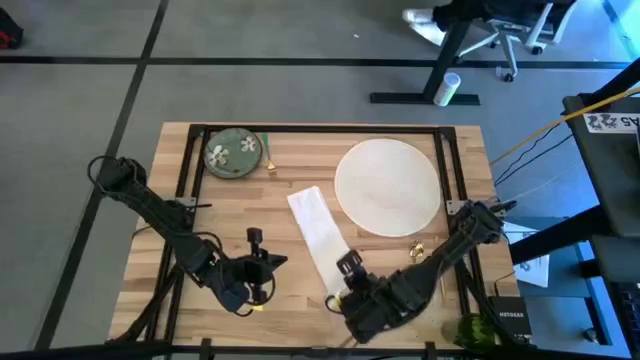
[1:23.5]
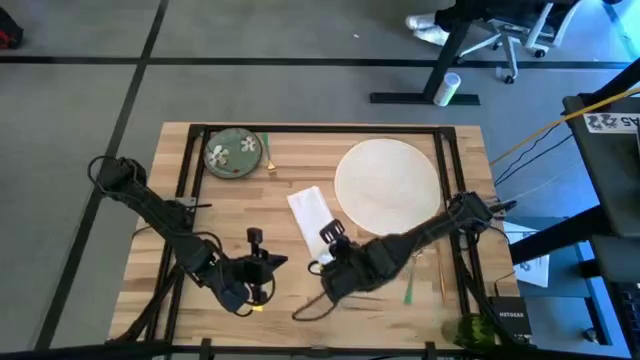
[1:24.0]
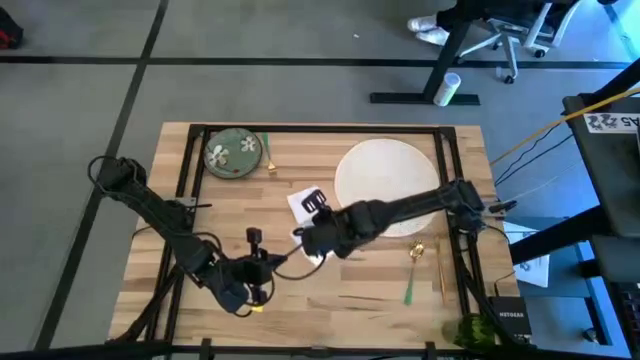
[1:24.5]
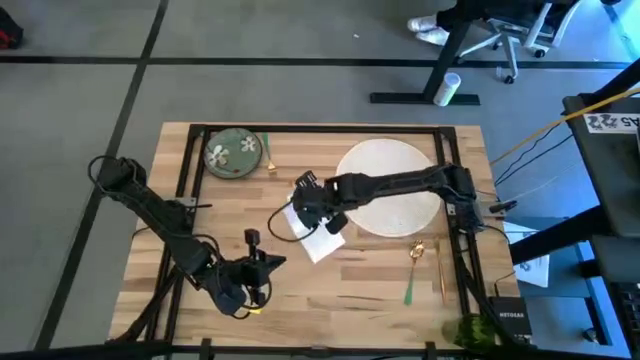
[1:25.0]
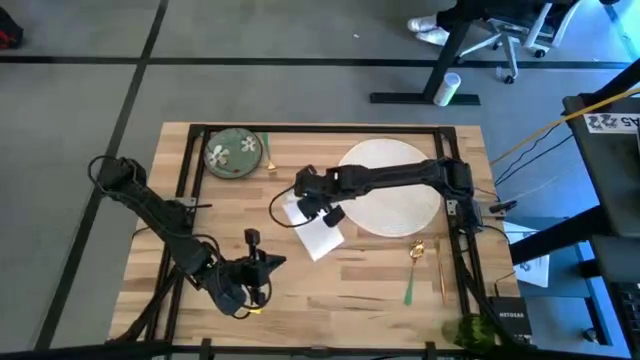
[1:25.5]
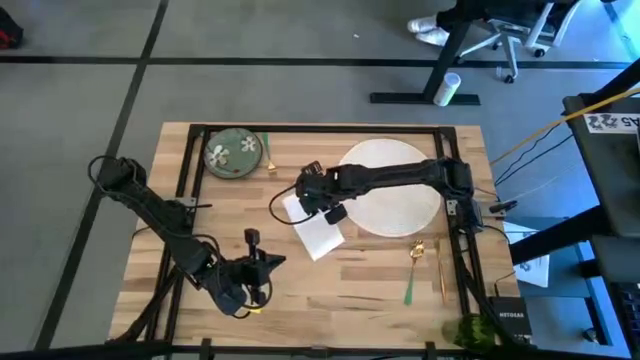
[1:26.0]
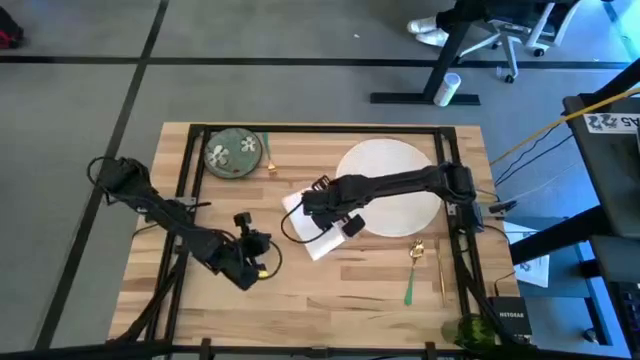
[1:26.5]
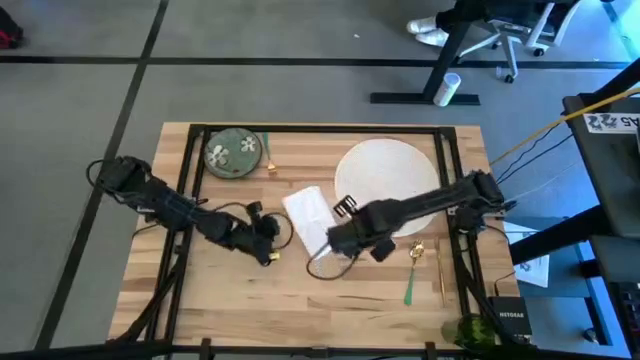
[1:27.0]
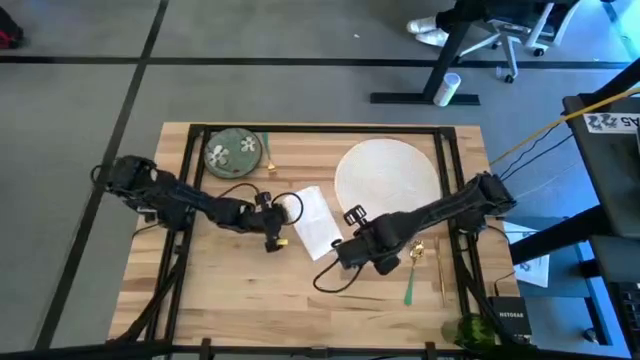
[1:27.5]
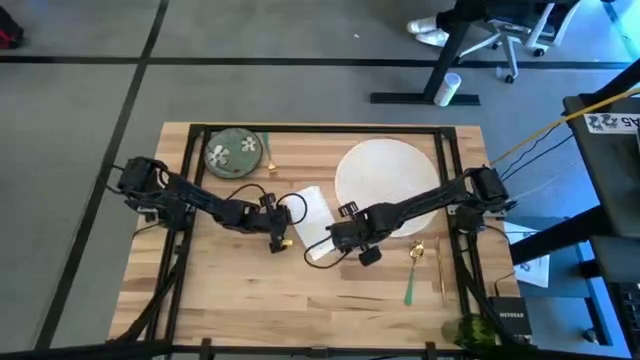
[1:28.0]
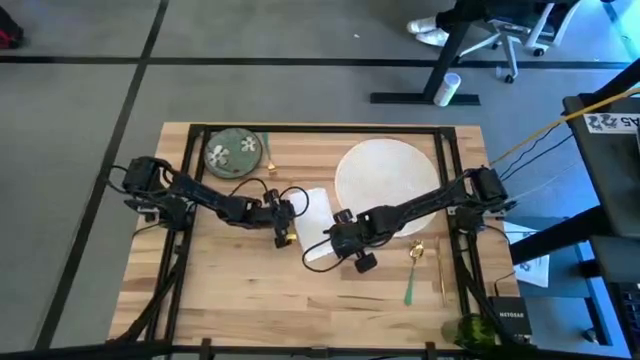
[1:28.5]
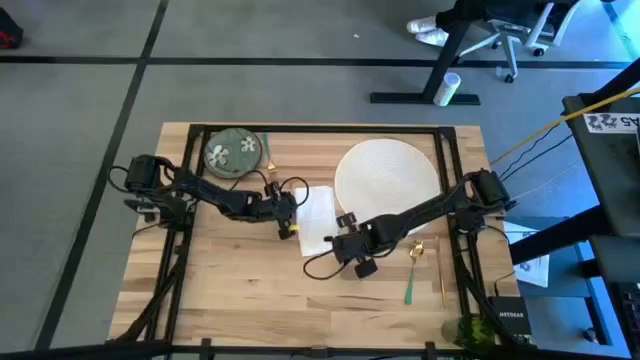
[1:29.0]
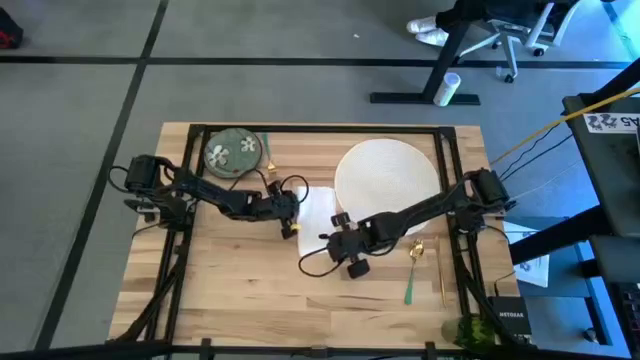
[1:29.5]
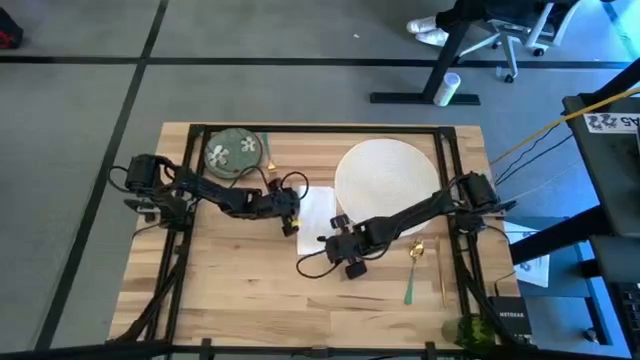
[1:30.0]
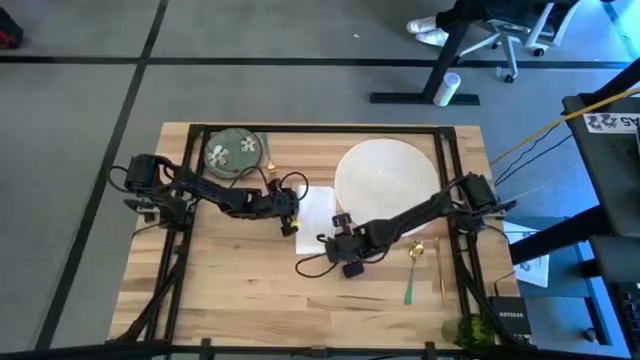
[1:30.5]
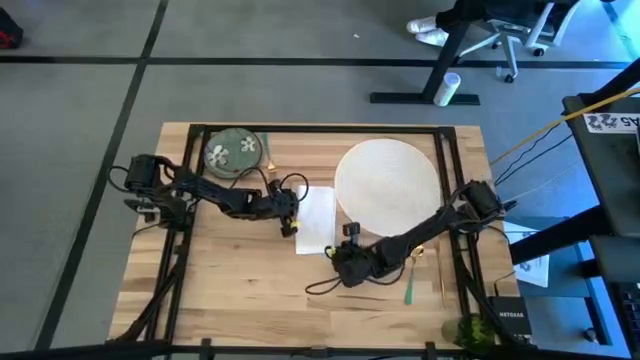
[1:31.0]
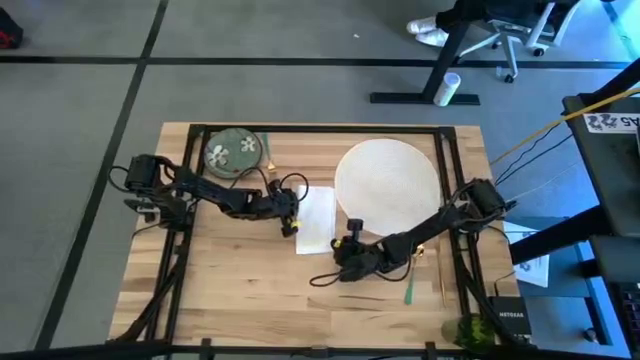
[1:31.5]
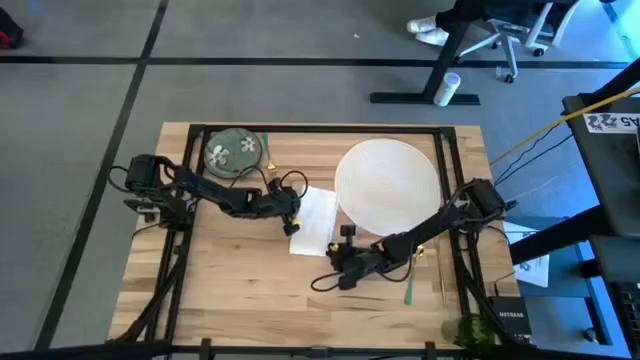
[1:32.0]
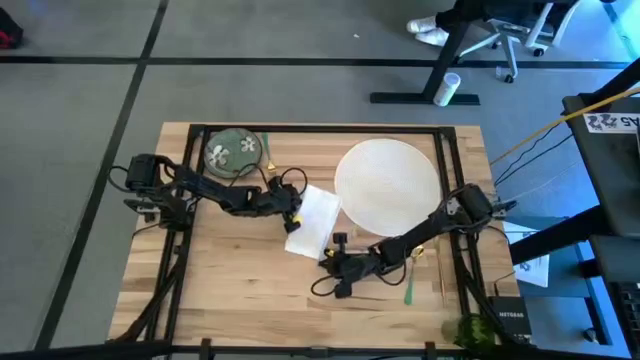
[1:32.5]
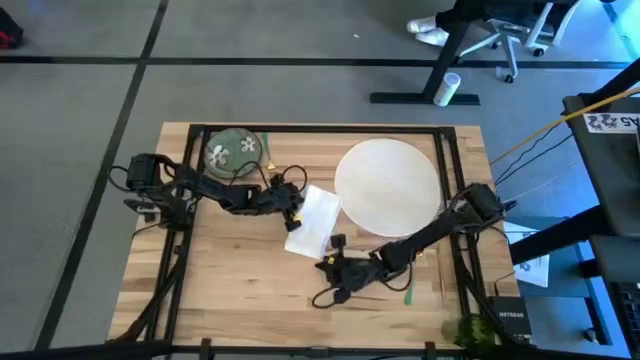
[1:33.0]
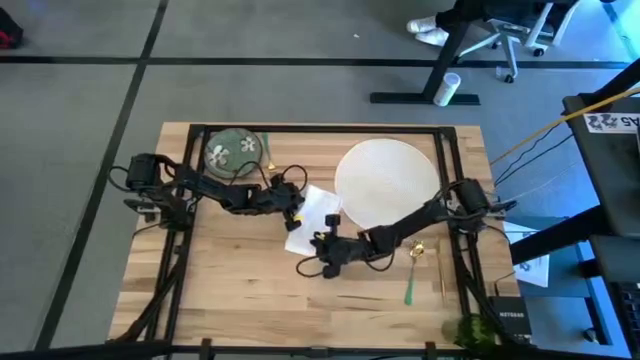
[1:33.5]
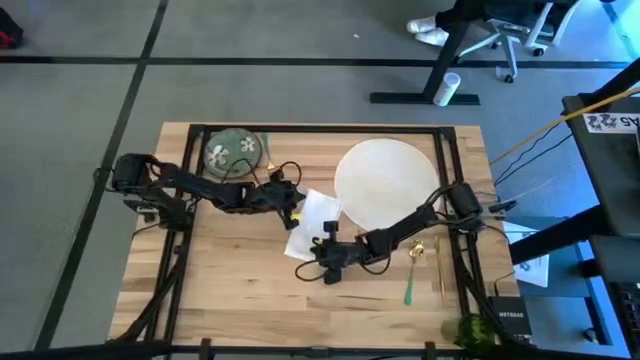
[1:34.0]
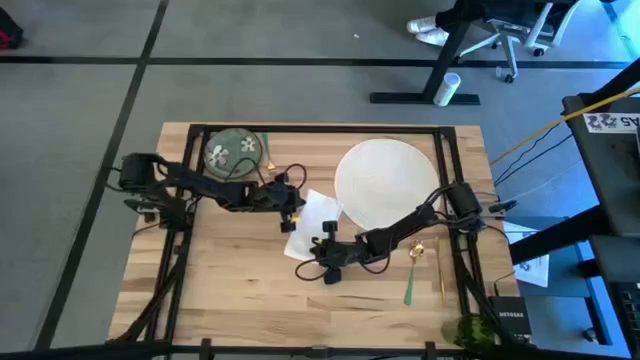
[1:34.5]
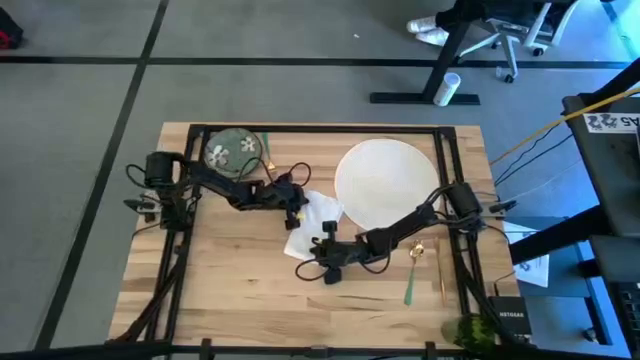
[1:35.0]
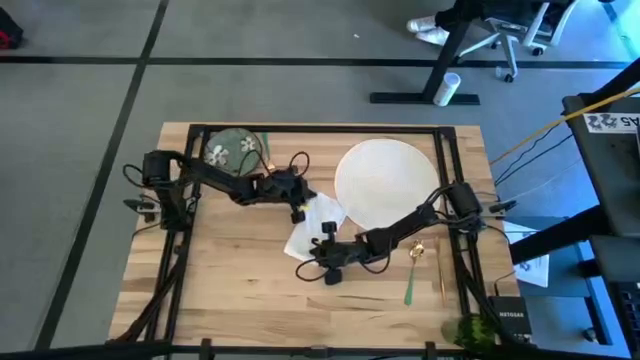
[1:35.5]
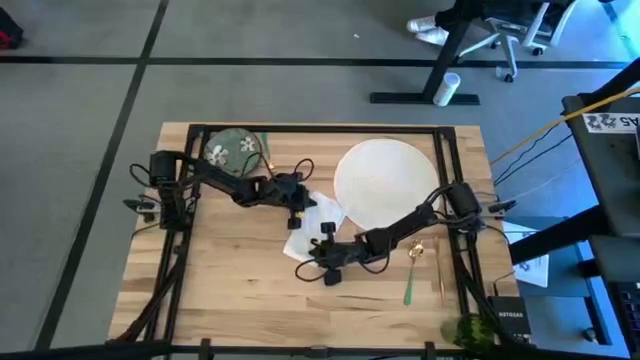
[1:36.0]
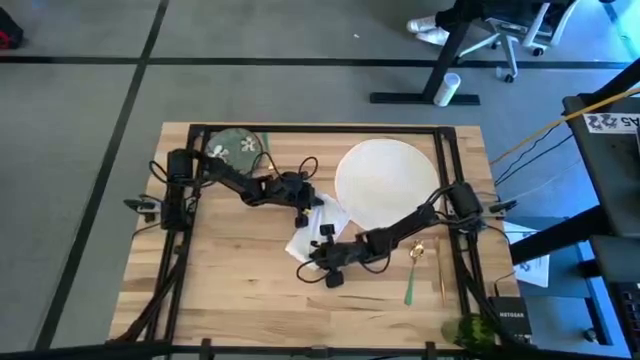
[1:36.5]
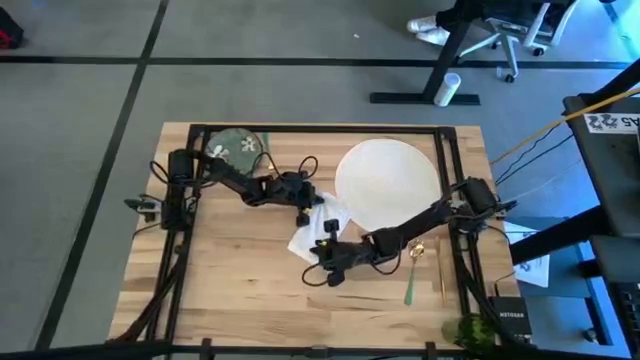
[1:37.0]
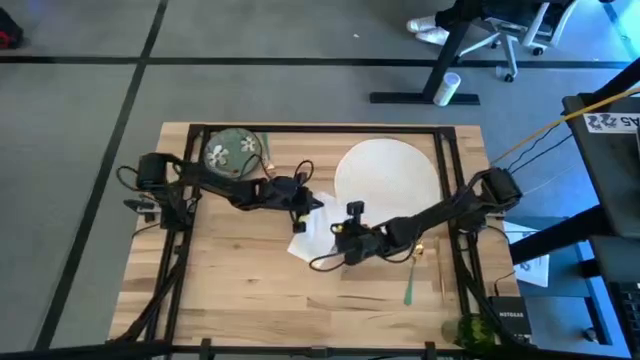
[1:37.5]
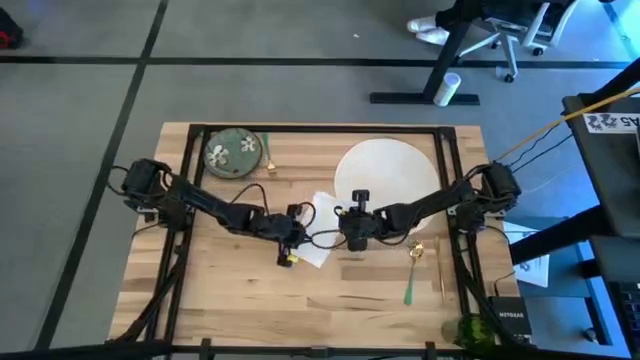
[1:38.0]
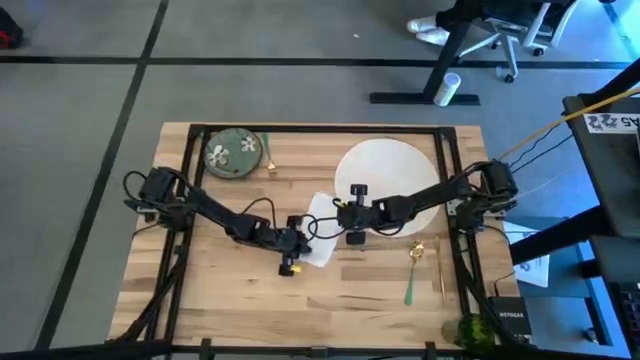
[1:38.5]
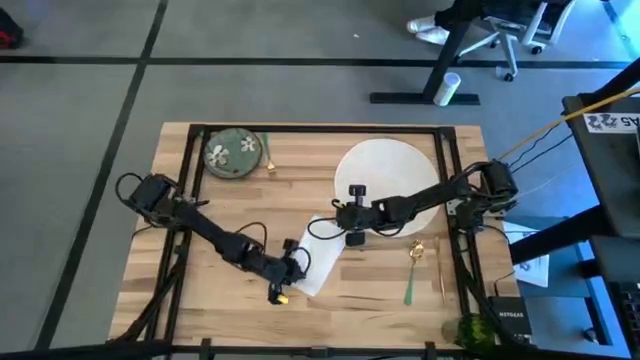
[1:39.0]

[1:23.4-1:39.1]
Task: Set table place
Fold the white table napkin

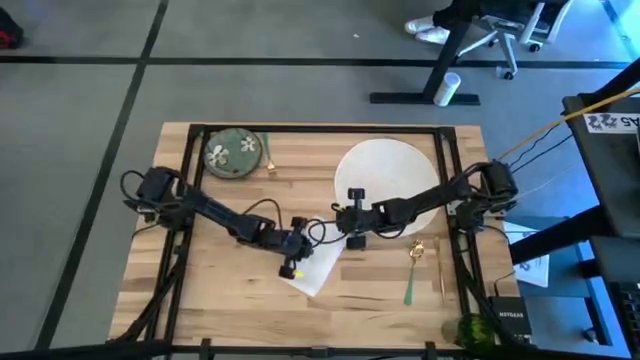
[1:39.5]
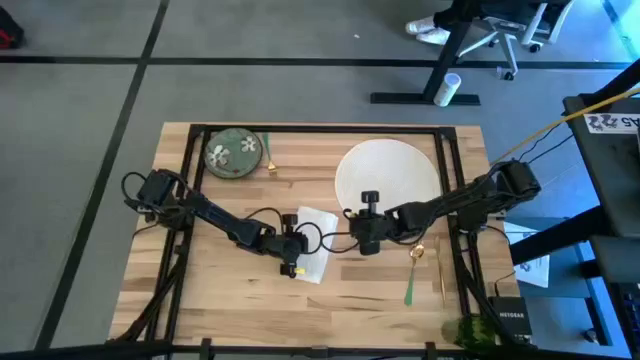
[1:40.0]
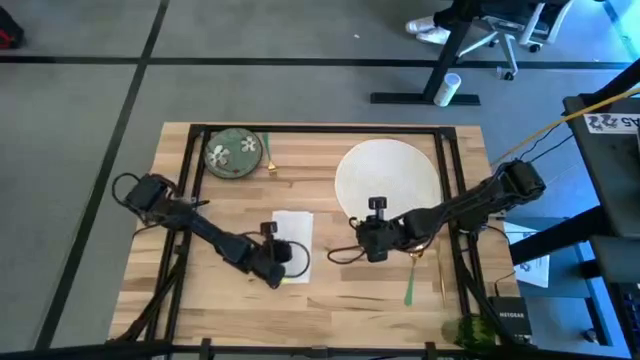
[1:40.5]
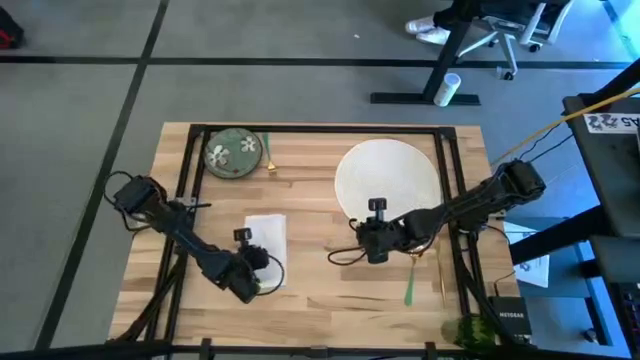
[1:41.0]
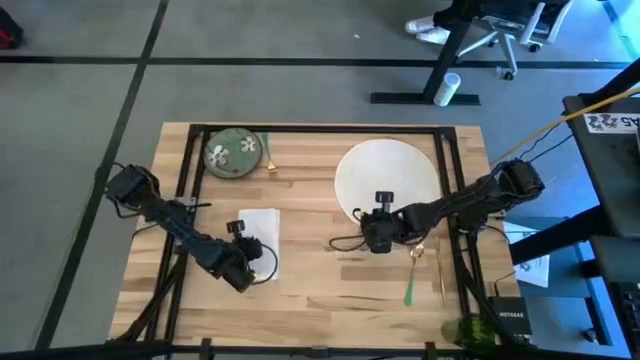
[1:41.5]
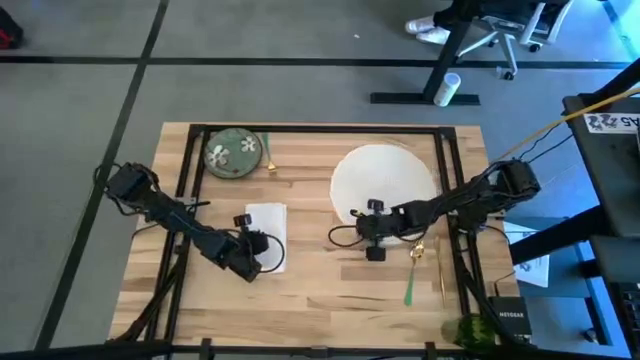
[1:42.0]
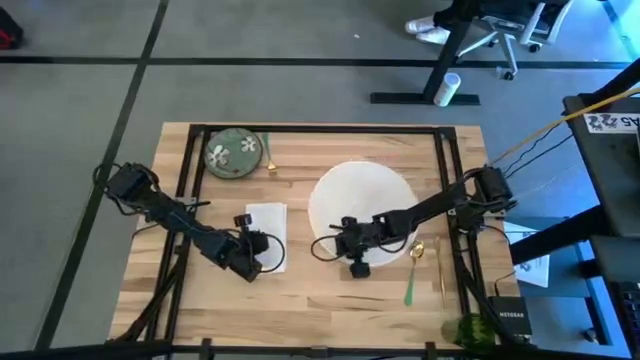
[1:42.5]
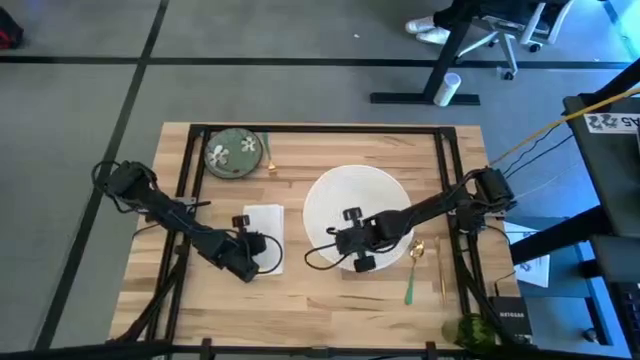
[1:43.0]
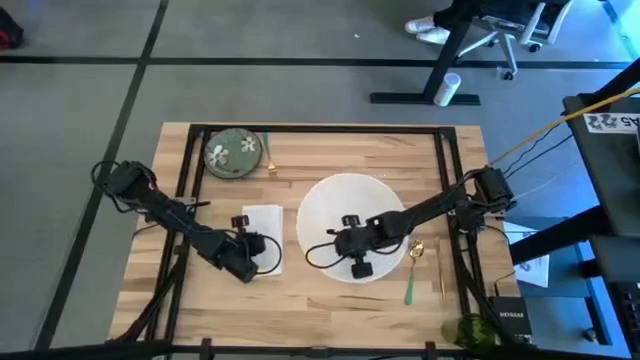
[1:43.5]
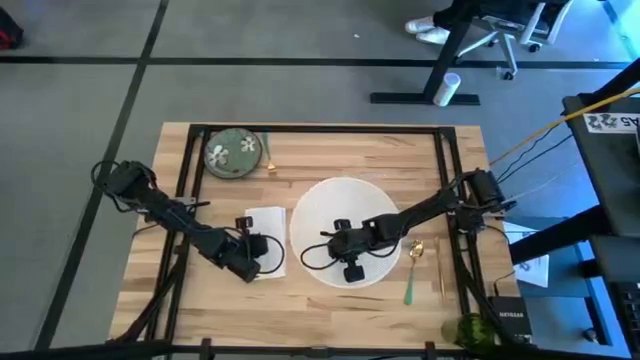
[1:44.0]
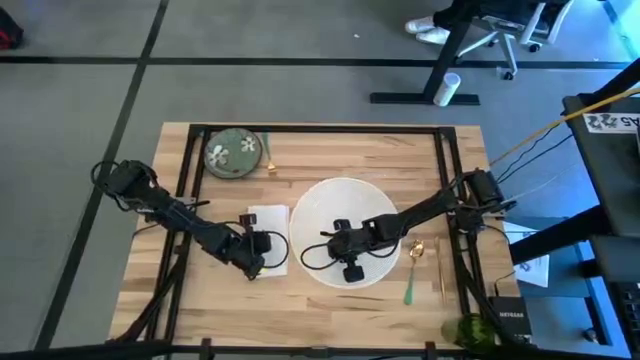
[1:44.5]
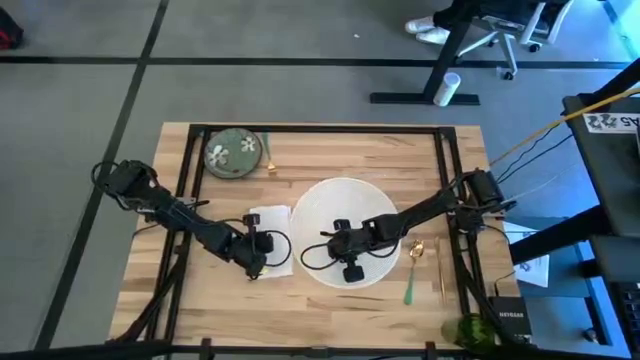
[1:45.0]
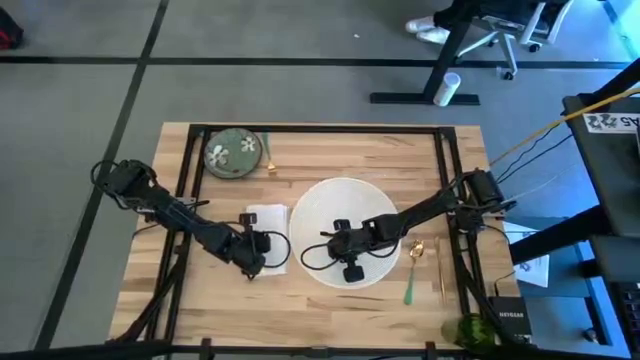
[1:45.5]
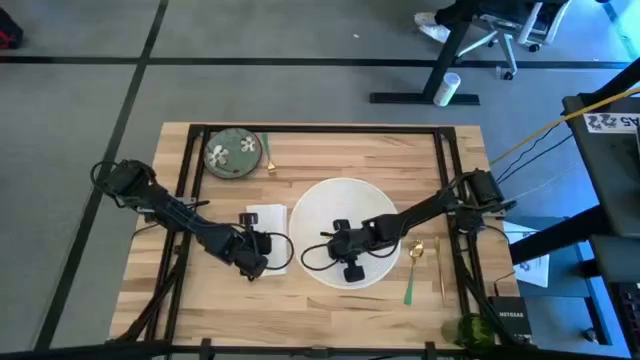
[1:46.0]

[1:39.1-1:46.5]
Adjust the white table napkin and white table mat closer together
